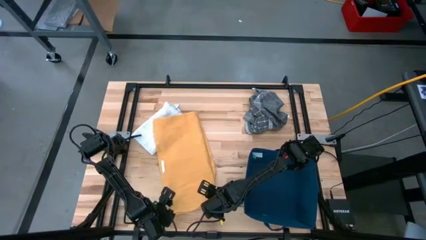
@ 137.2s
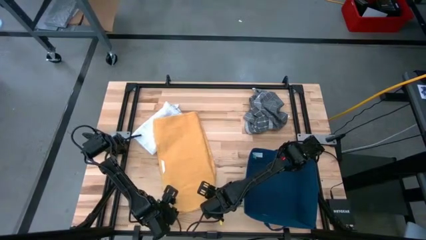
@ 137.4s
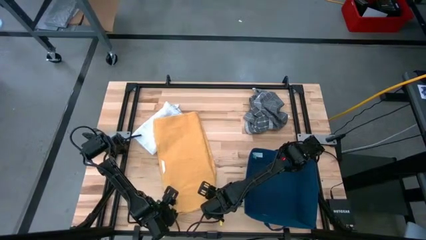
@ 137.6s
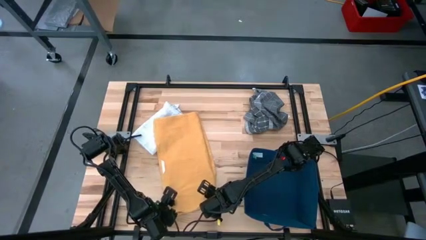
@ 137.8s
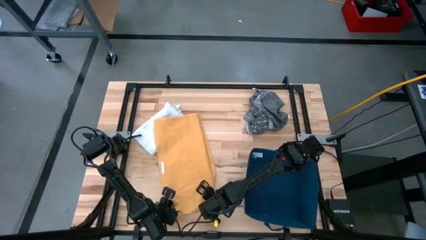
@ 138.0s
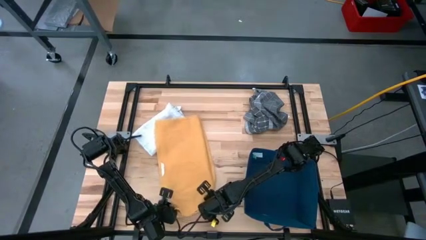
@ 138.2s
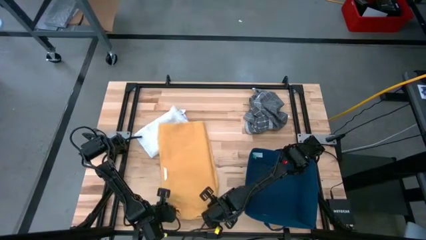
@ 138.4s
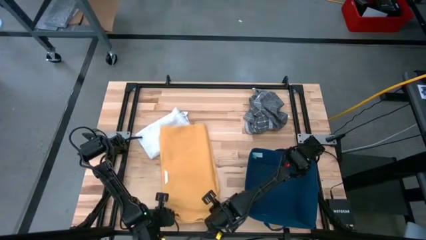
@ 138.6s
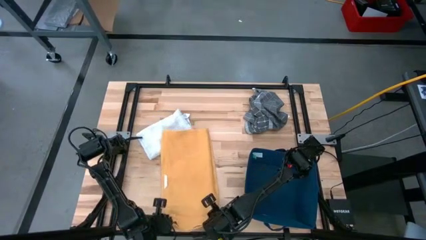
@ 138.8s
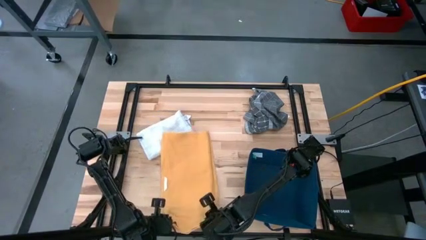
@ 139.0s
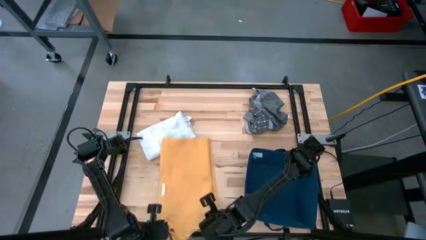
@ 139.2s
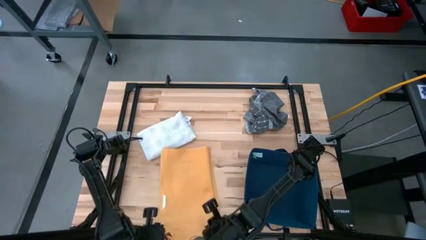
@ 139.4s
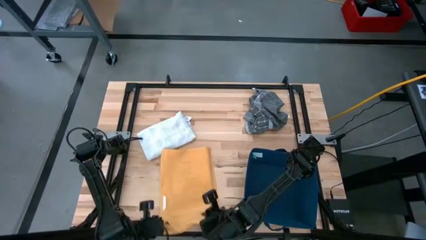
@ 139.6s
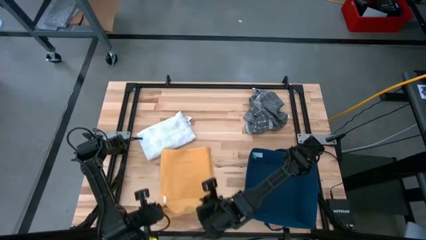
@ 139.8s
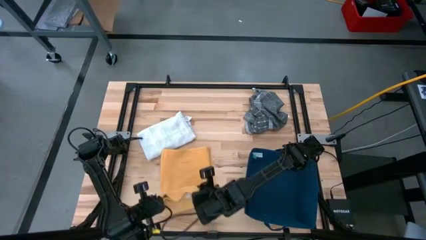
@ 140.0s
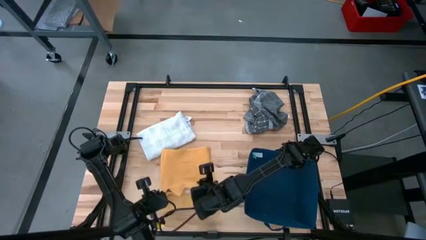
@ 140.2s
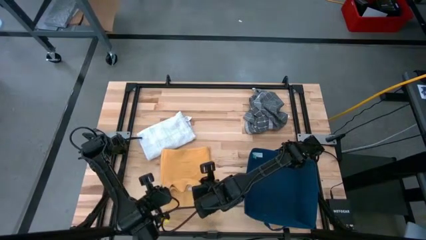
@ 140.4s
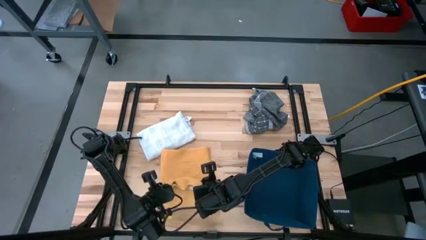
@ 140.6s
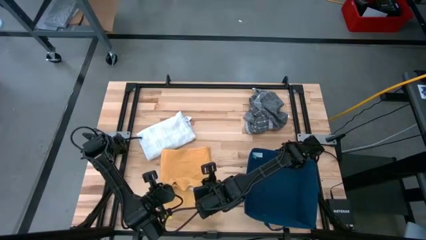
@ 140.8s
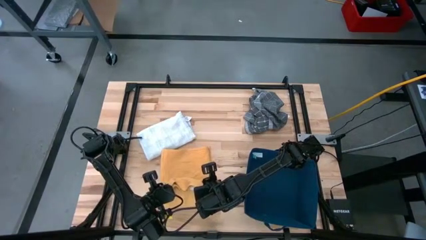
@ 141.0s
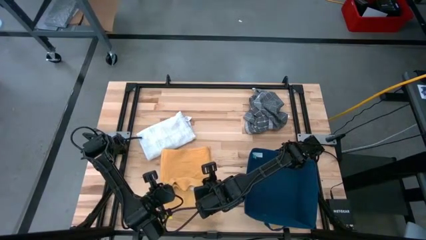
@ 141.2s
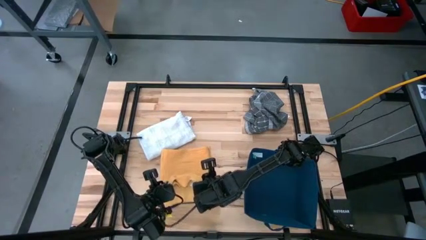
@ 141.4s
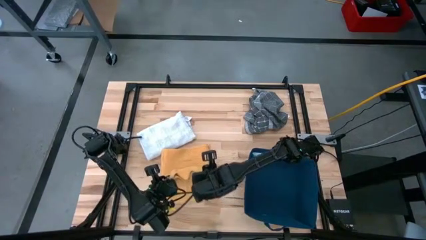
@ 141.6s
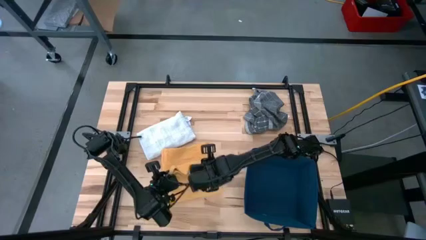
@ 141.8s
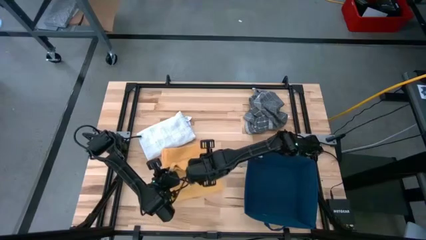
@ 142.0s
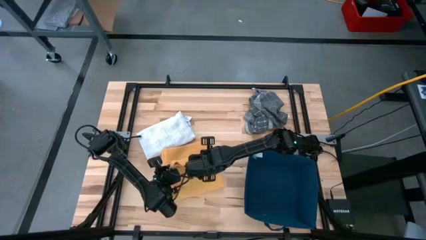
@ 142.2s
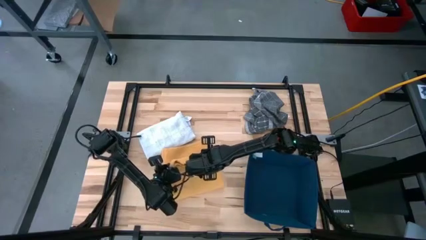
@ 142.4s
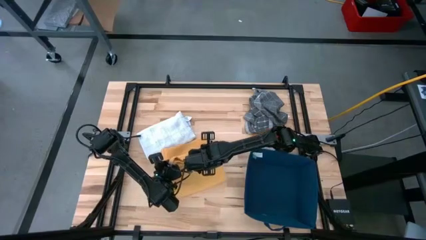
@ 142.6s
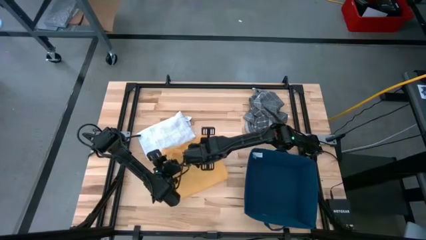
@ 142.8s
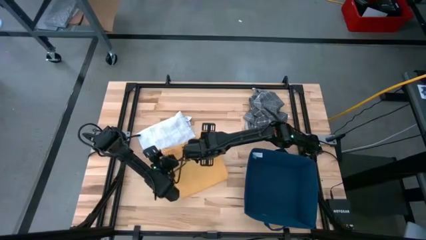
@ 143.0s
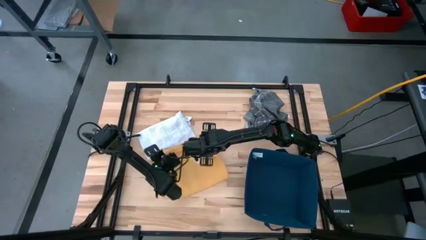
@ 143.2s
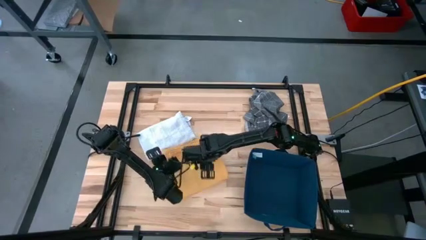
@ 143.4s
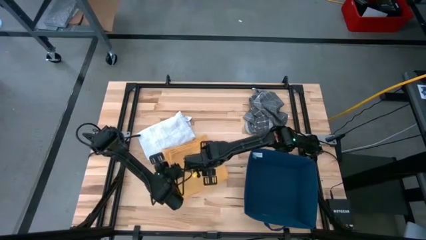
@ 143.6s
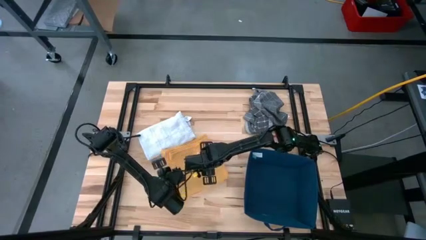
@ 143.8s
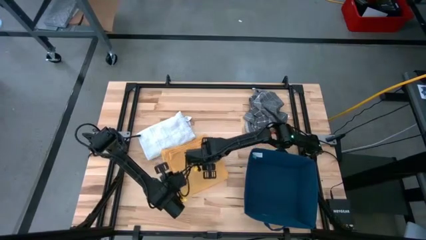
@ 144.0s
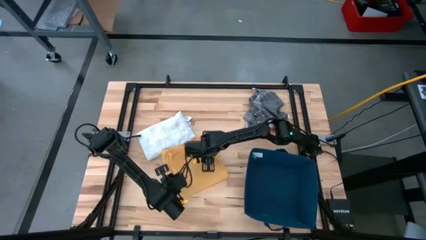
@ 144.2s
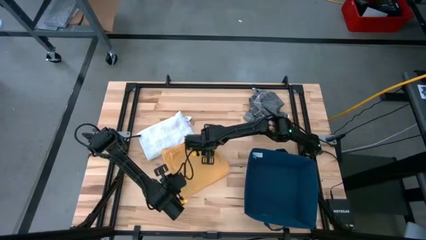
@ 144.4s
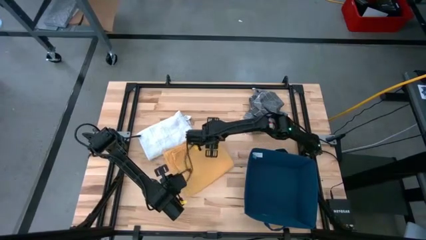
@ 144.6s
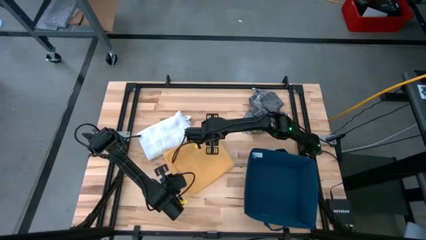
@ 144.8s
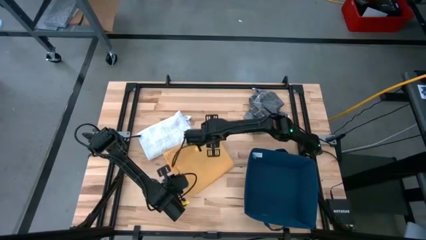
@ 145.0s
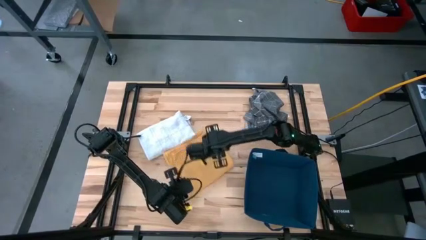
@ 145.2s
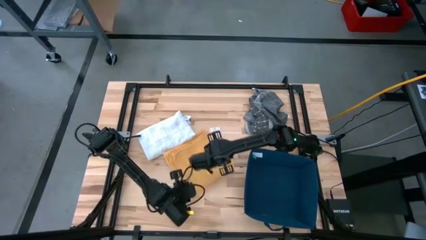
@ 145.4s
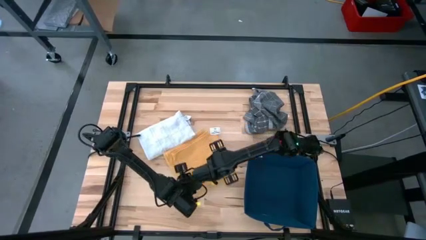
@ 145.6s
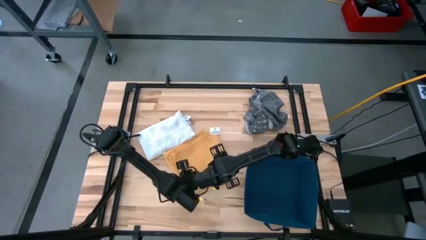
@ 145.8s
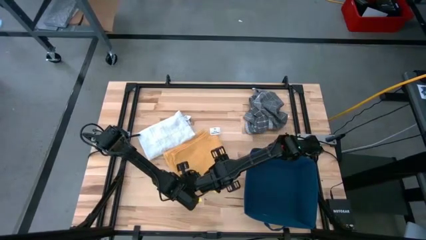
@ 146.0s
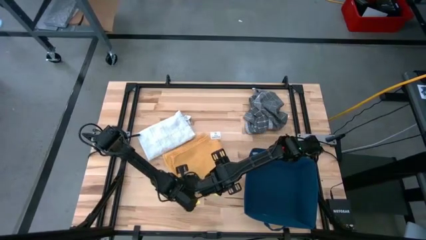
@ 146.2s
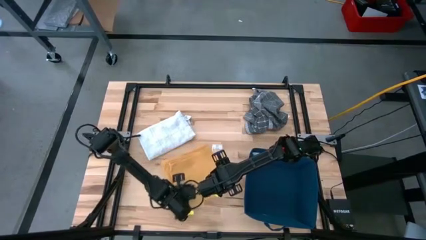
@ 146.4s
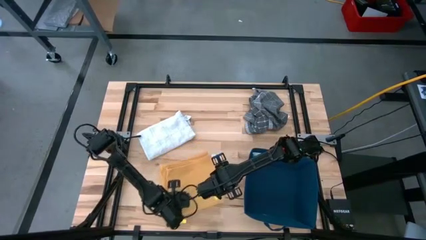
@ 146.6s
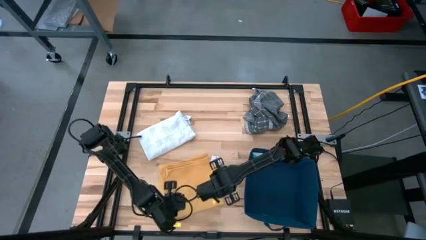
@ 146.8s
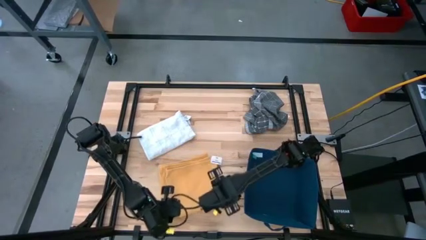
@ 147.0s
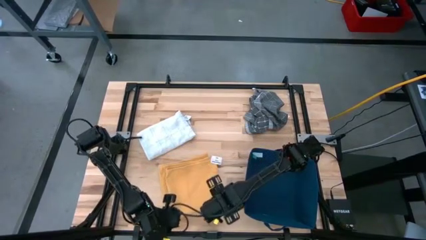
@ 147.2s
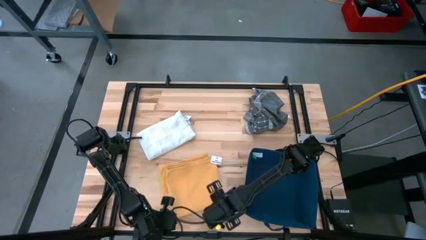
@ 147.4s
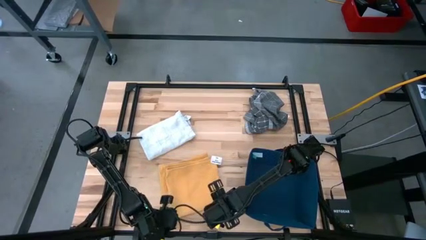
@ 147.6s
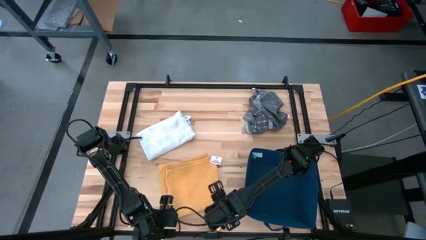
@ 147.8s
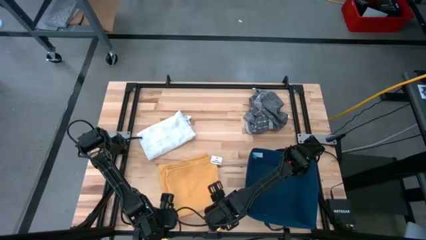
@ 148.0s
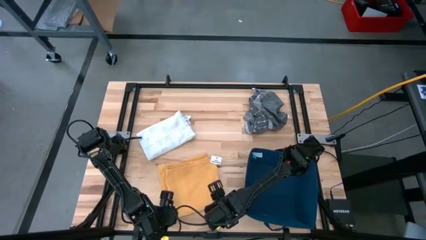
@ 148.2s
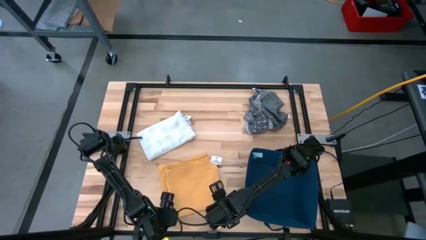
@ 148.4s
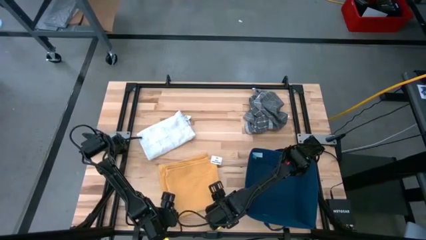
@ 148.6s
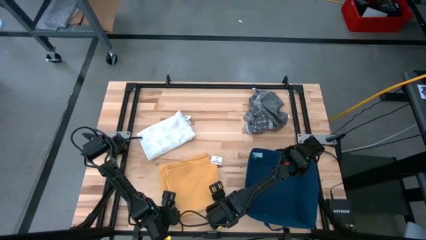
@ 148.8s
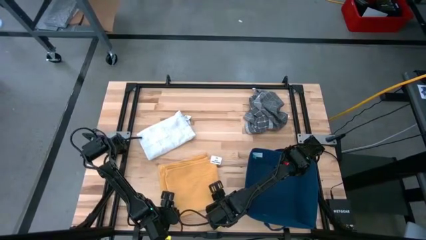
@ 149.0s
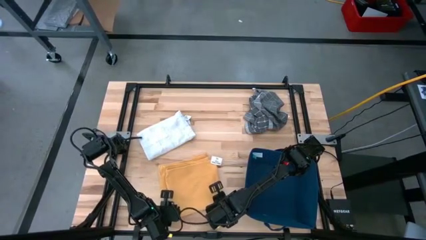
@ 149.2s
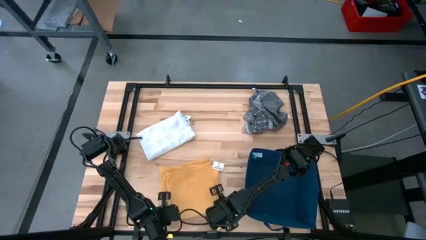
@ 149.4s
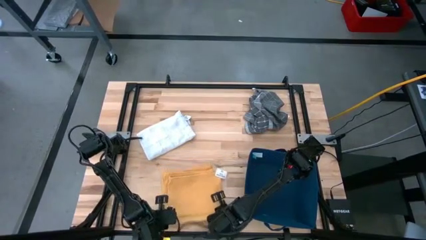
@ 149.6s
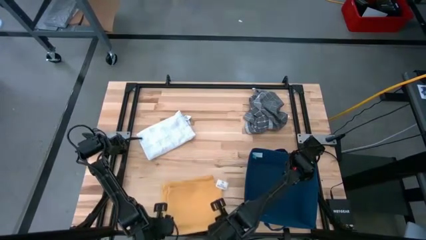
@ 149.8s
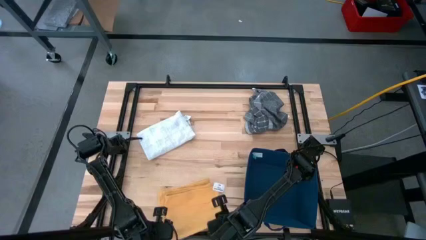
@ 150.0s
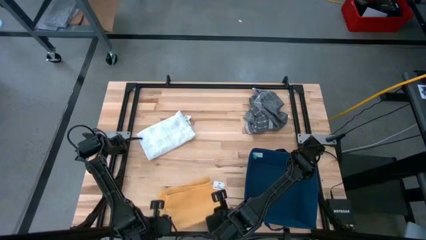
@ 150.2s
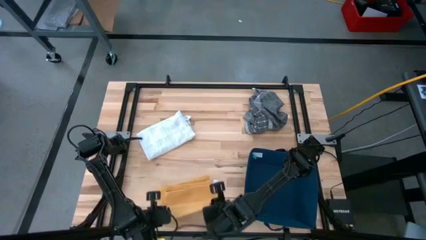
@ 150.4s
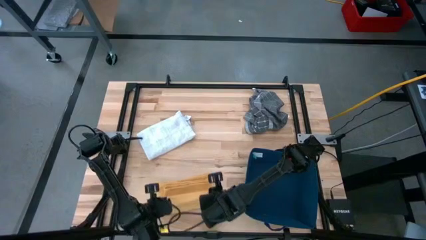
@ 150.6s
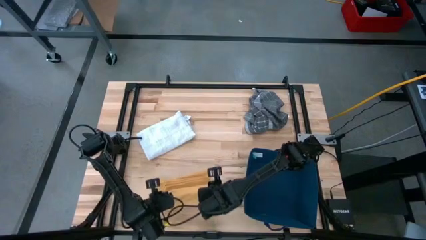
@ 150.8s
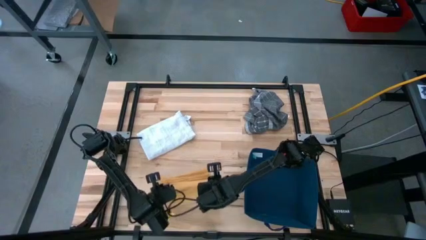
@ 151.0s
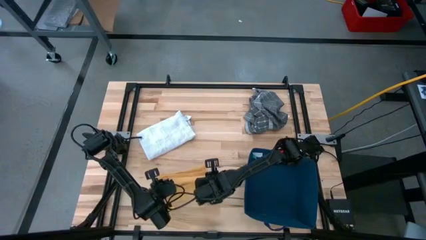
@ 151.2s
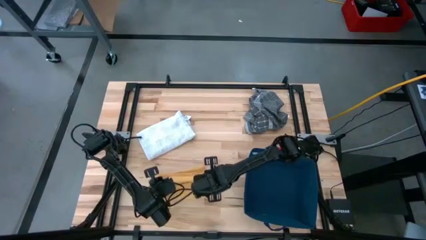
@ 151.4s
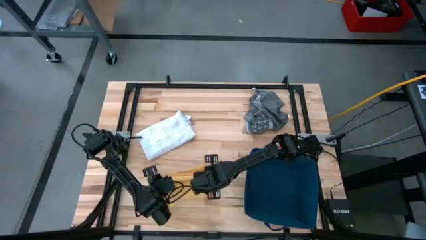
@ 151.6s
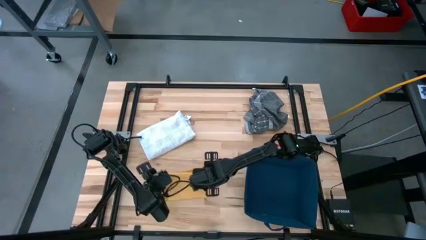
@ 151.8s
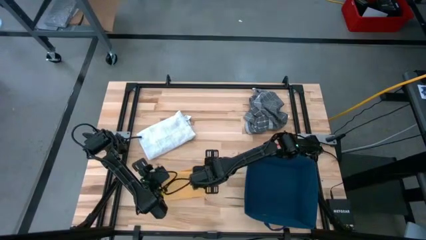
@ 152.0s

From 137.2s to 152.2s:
Task: Fold towel
Fold the yellow towel
